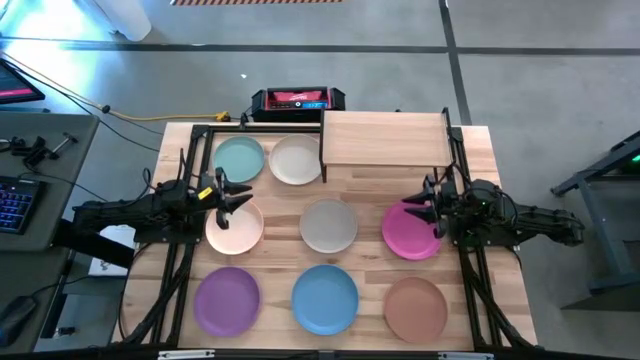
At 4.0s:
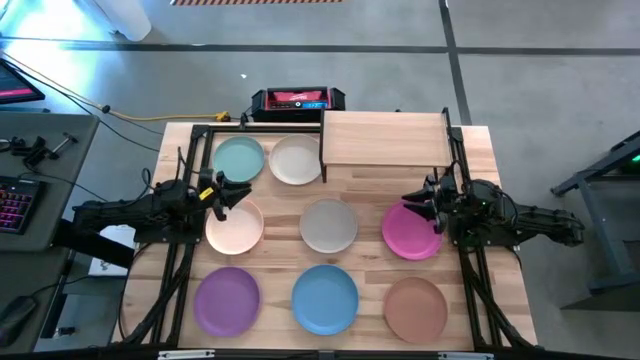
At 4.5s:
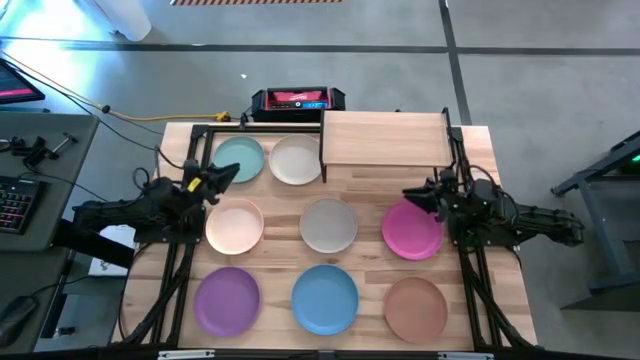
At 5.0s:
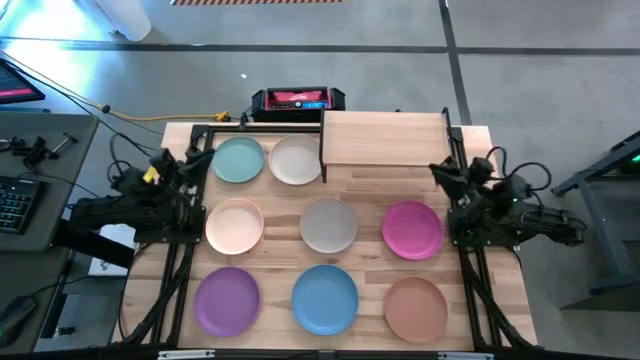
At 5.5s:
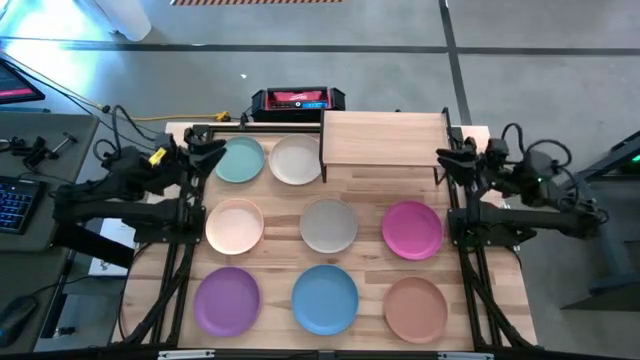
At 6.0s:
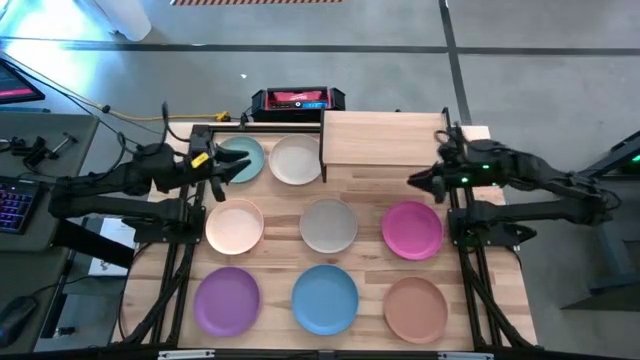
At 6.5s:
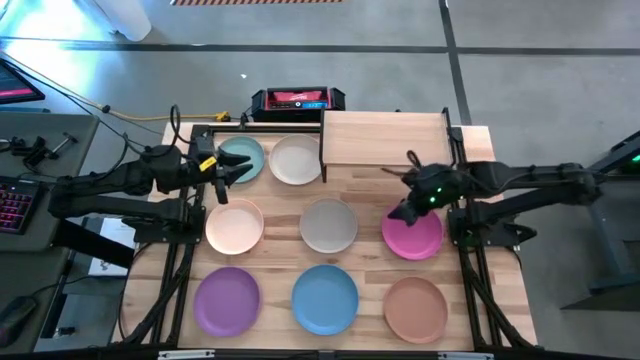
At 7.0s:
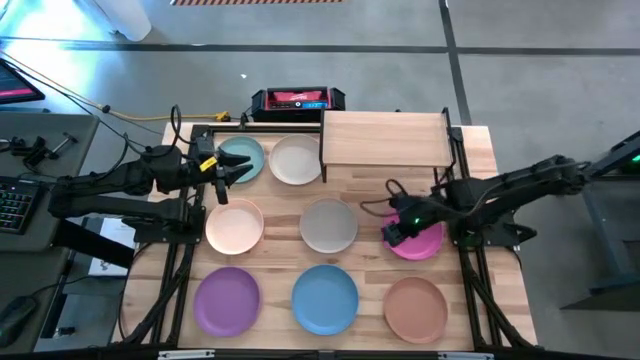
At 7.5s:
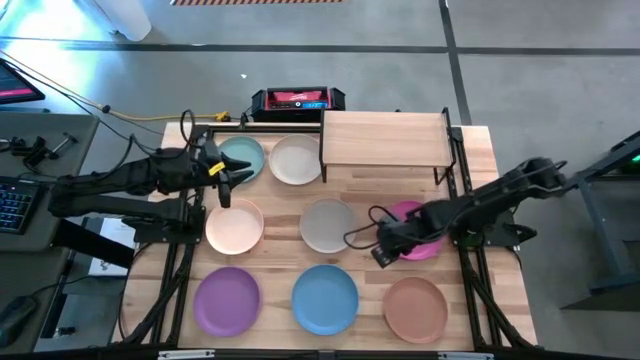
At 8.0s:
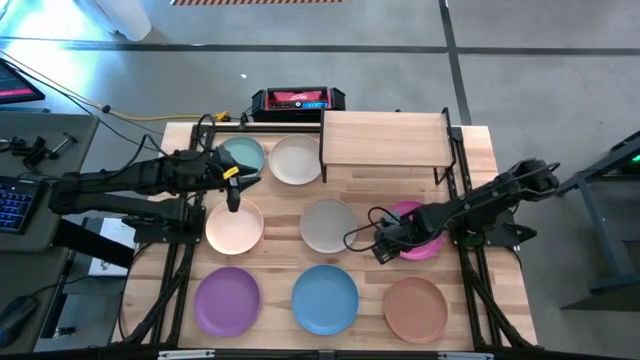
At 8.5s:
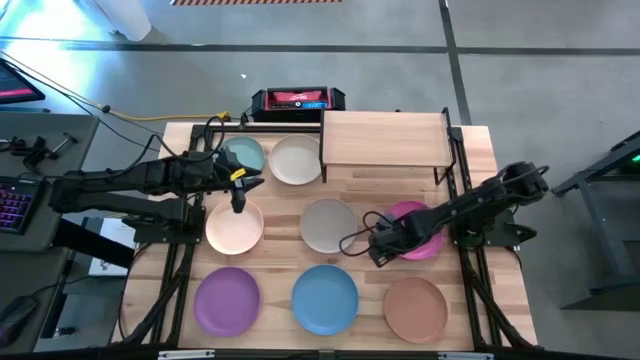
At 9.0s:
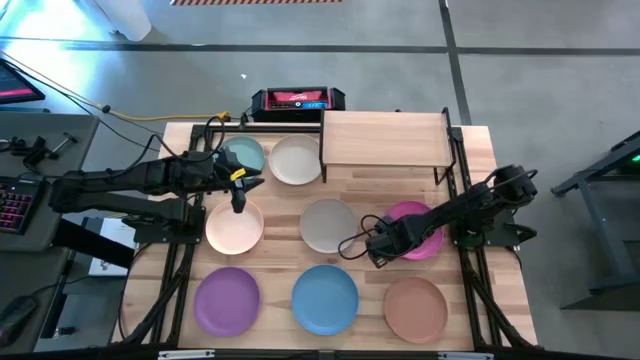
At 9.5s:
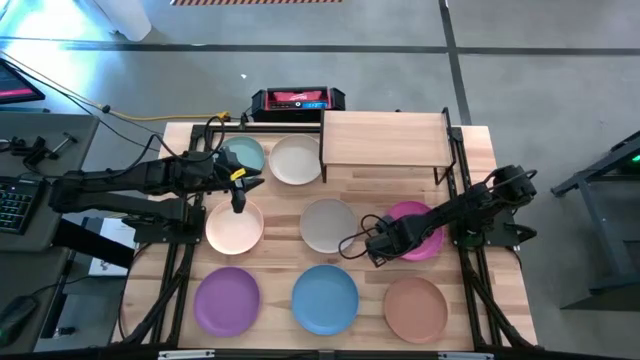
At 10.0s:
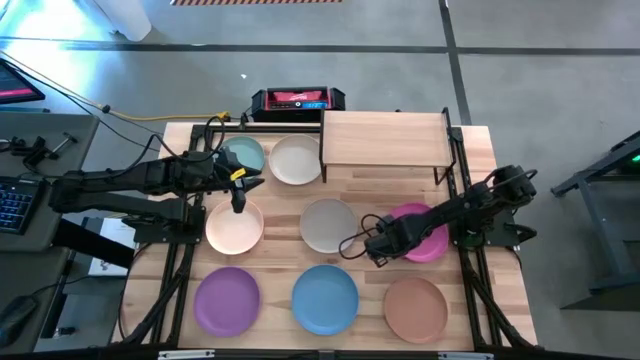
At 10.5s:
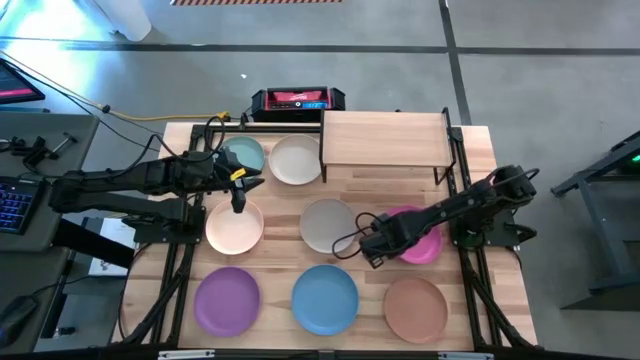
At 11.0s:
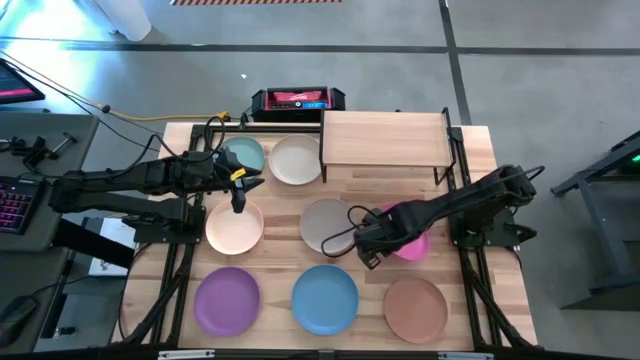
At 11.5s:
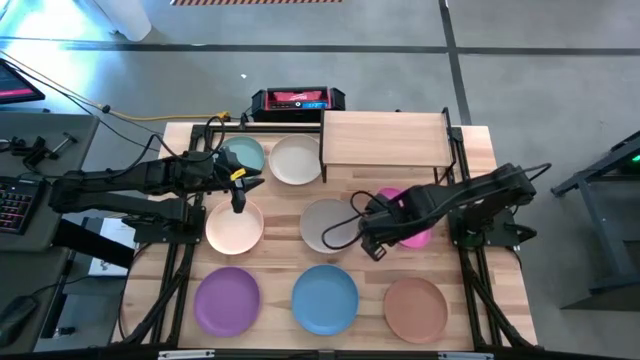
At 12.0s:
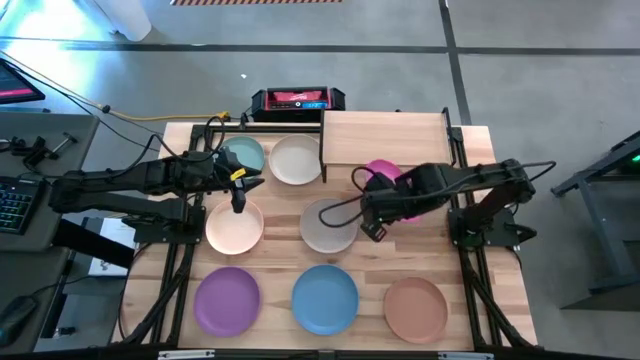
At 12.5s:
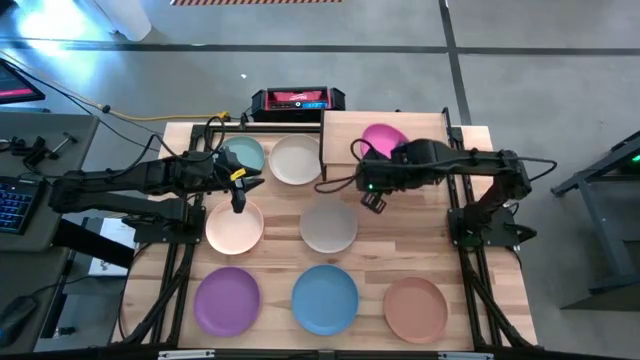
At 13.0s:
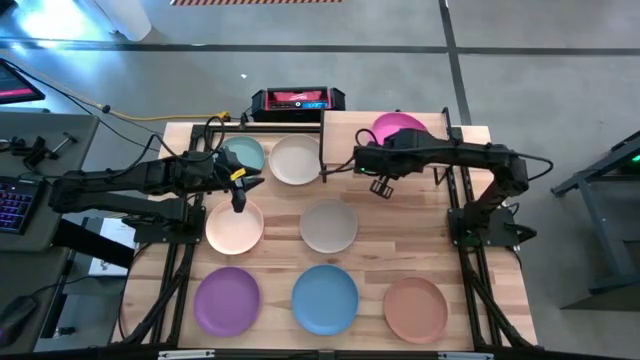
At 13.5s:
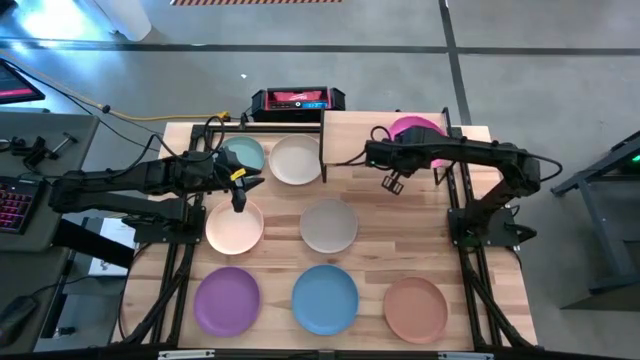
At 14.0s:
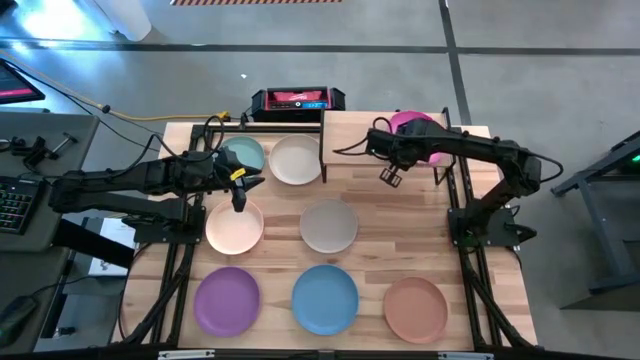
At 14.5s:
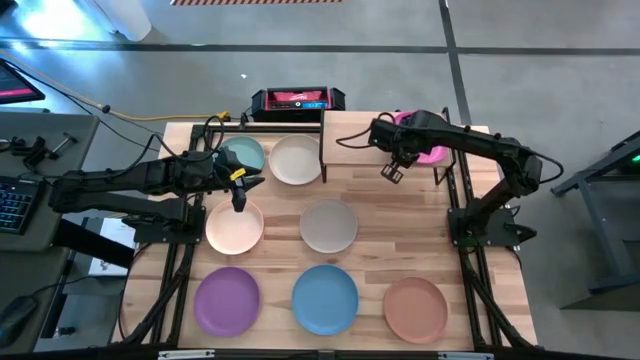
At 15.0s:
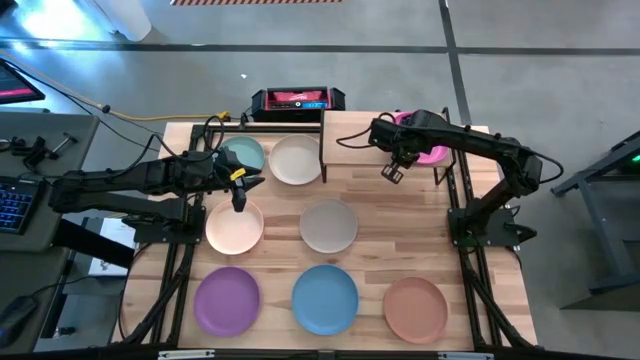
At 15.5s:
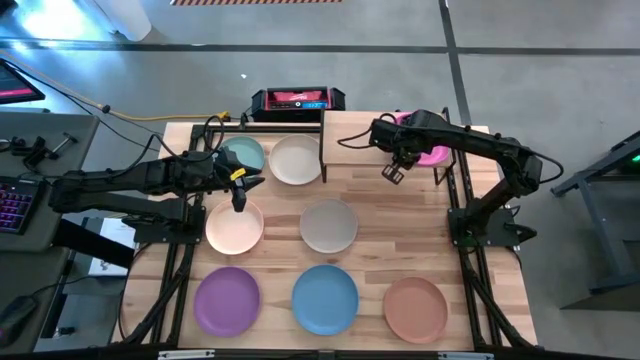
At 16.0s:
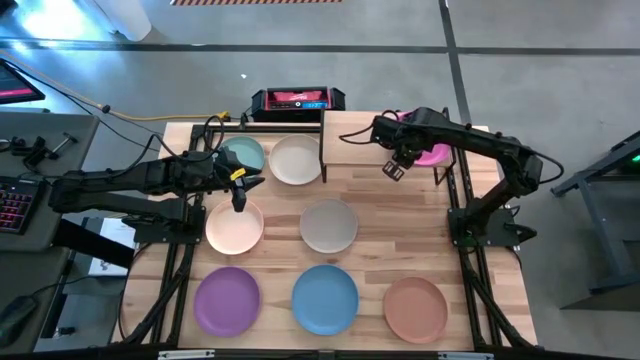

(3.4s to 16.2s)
Task: Place and stack plates onto a shelf
Put the pink plate on the shelf
